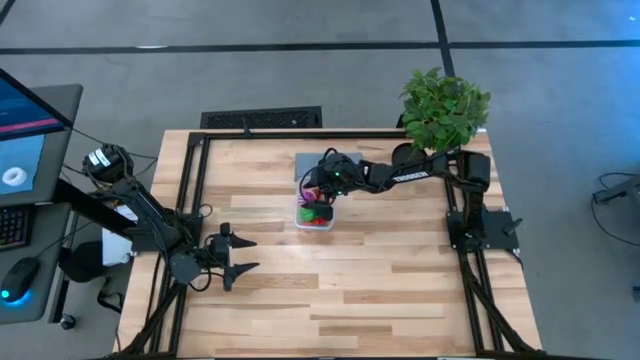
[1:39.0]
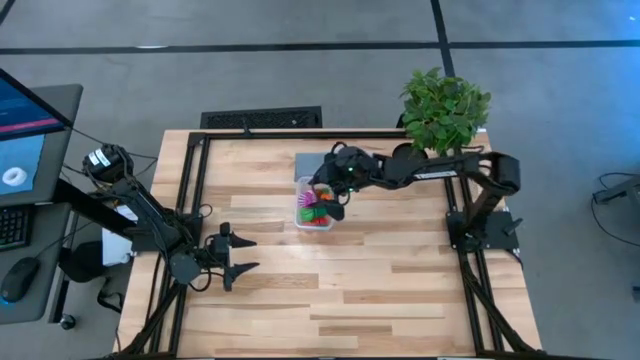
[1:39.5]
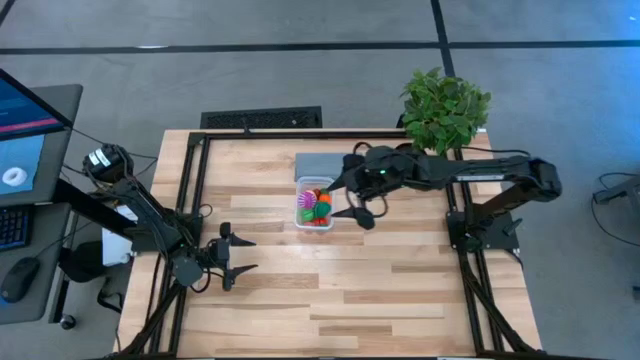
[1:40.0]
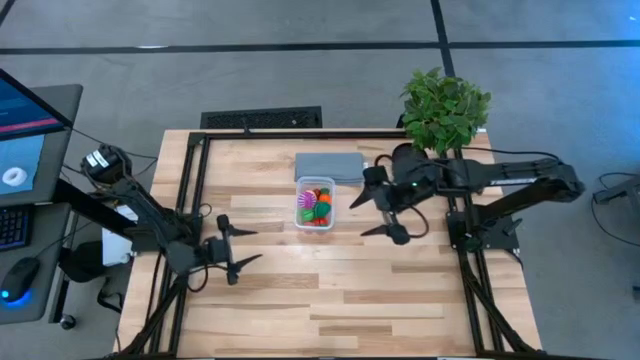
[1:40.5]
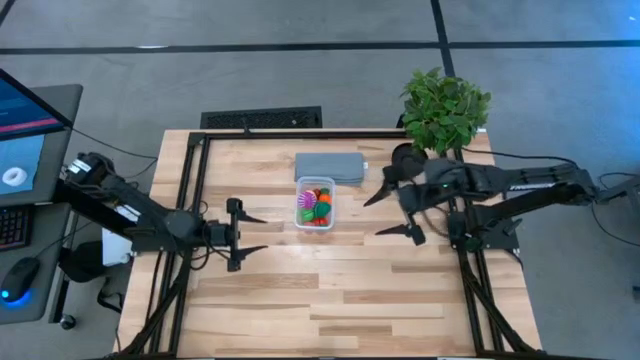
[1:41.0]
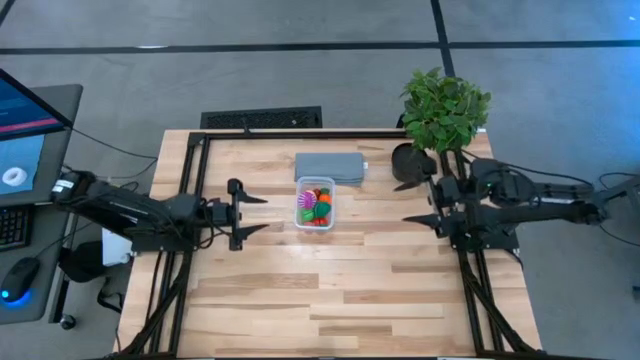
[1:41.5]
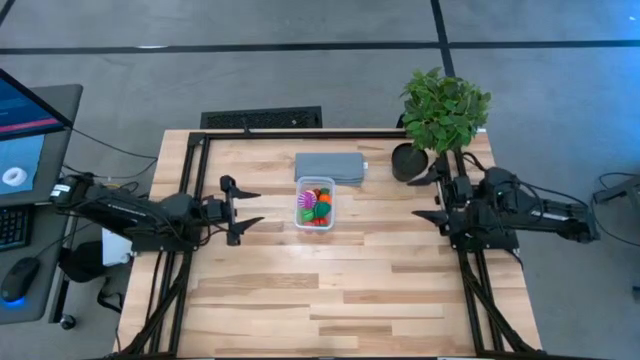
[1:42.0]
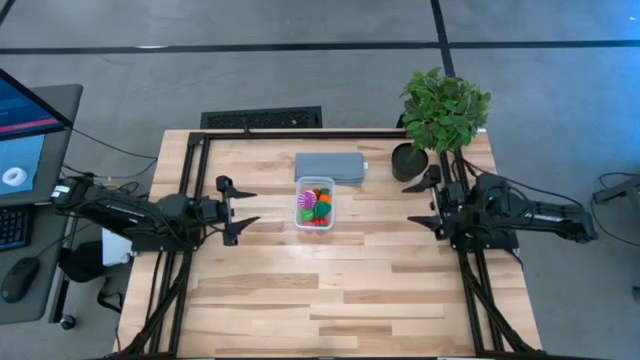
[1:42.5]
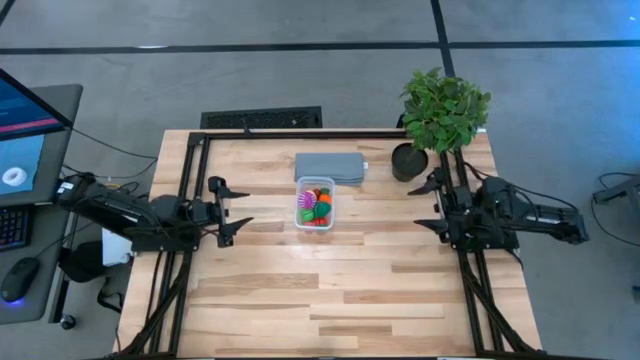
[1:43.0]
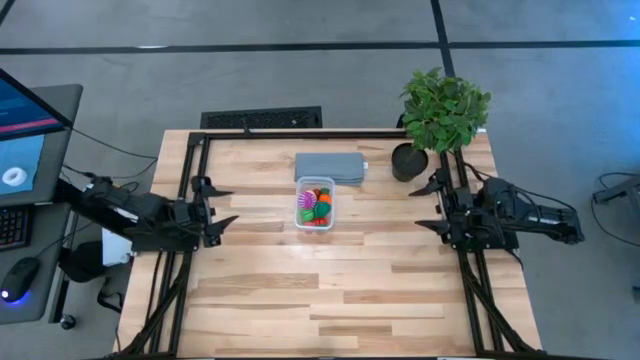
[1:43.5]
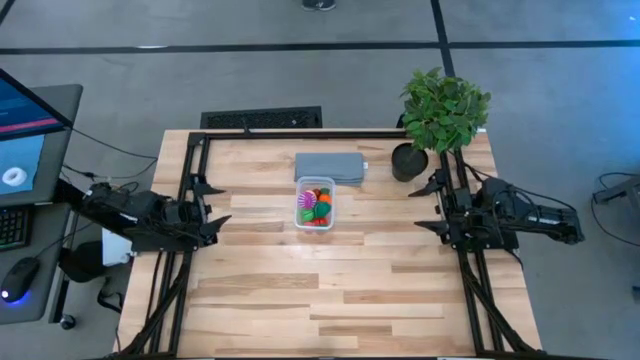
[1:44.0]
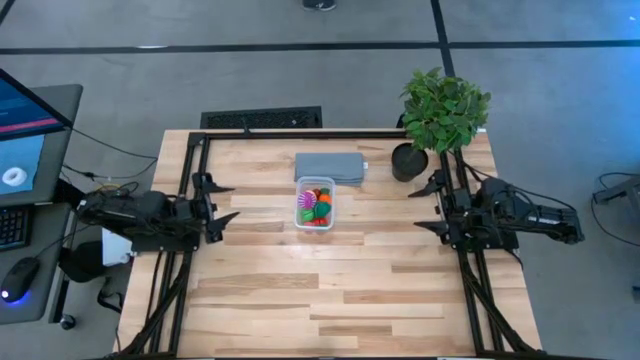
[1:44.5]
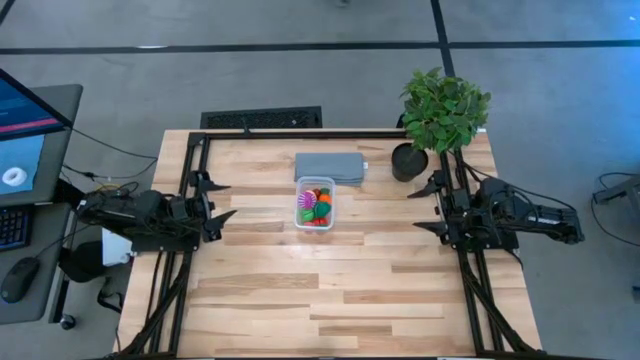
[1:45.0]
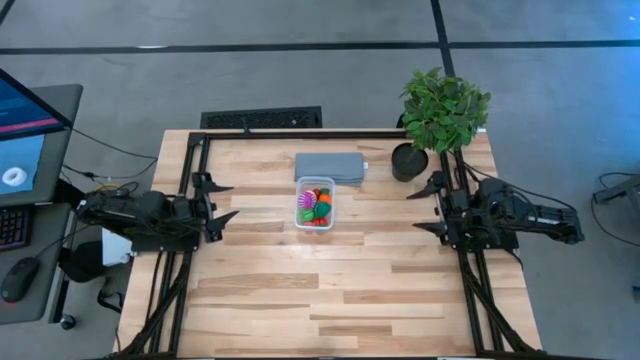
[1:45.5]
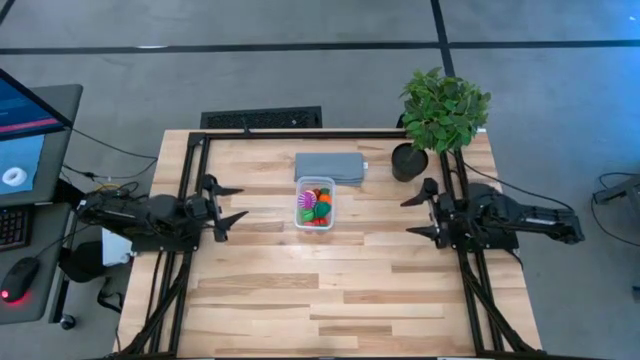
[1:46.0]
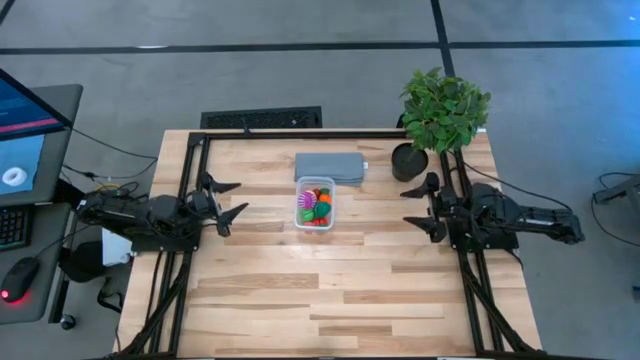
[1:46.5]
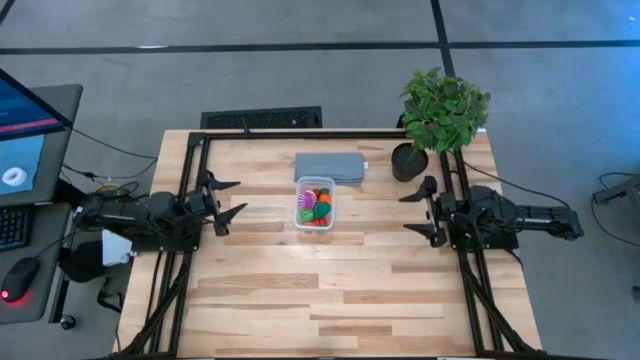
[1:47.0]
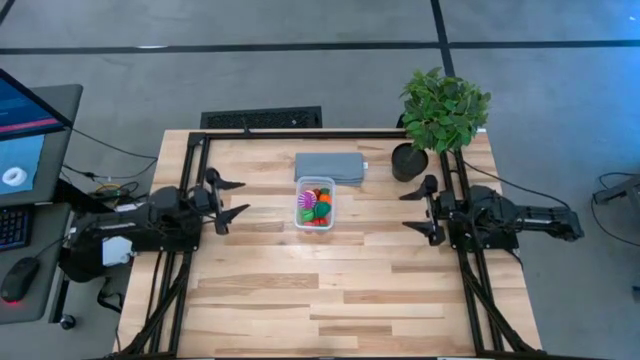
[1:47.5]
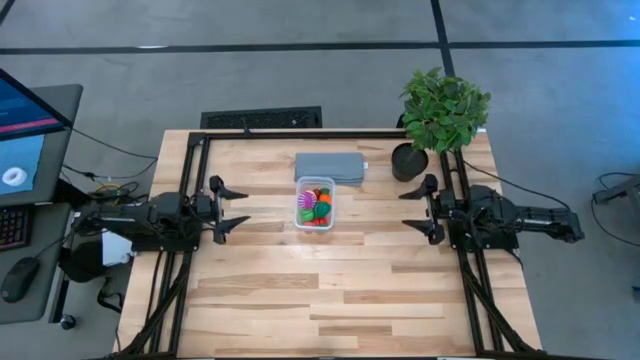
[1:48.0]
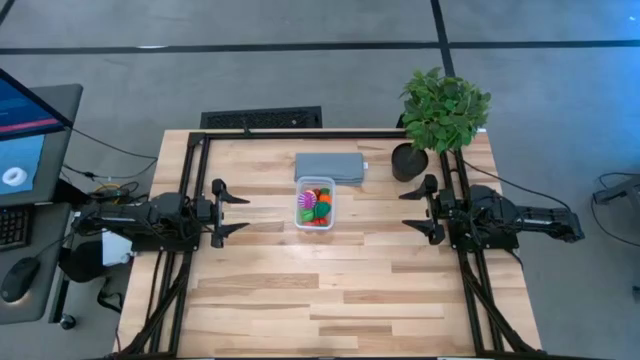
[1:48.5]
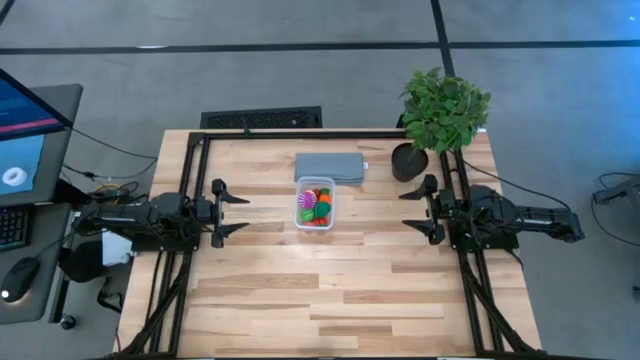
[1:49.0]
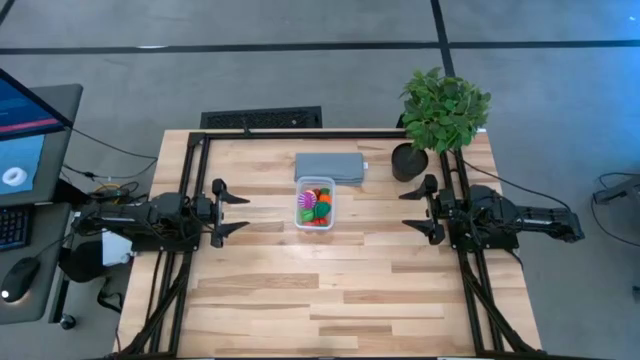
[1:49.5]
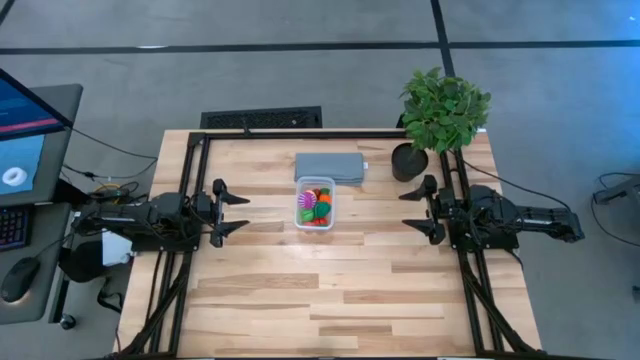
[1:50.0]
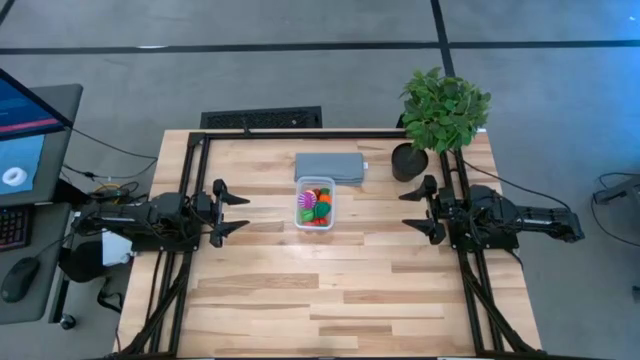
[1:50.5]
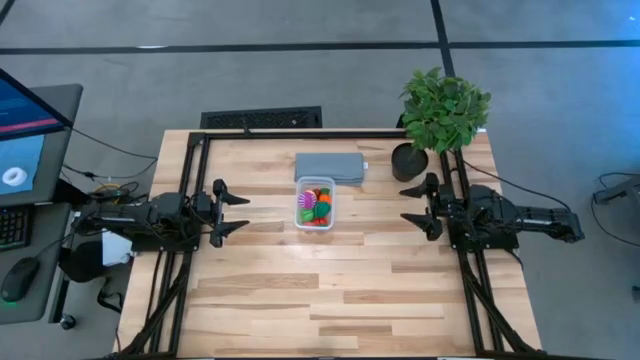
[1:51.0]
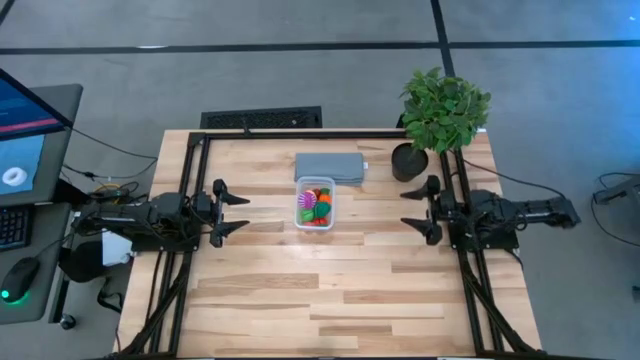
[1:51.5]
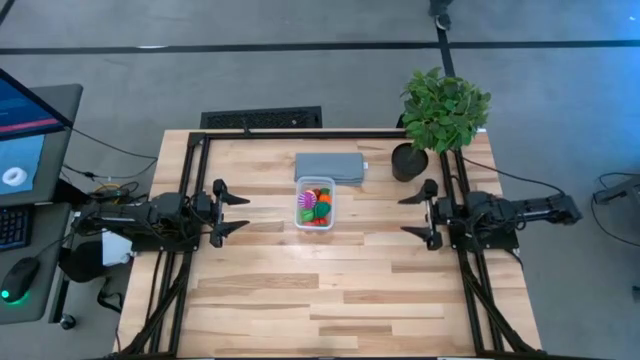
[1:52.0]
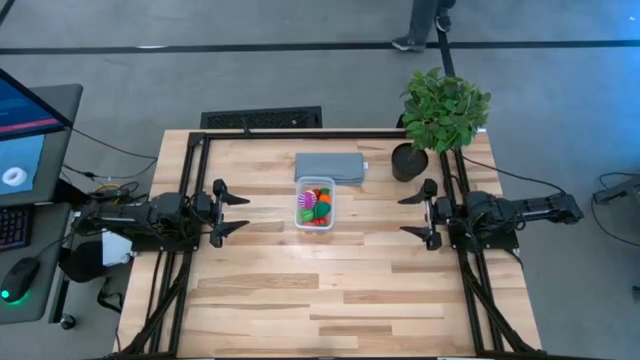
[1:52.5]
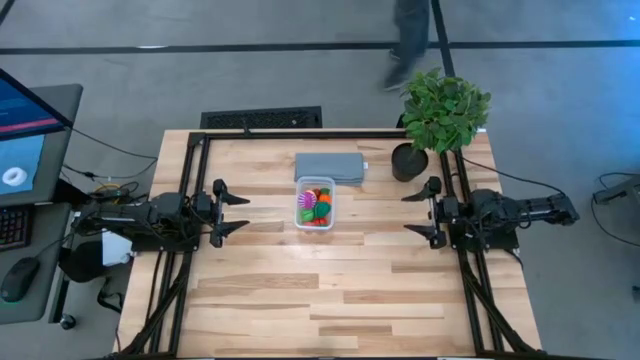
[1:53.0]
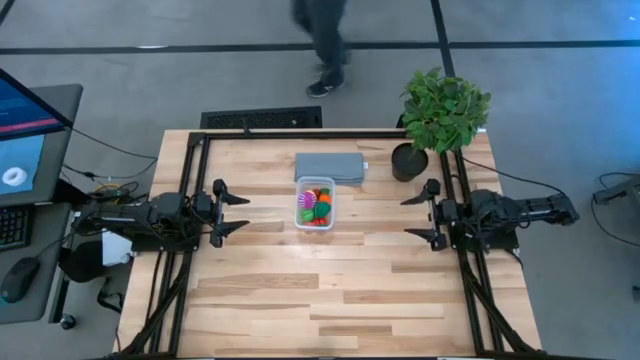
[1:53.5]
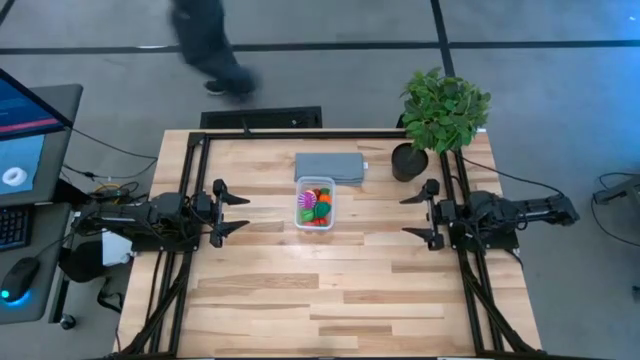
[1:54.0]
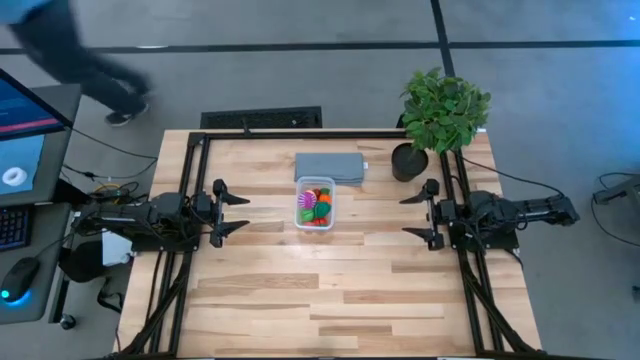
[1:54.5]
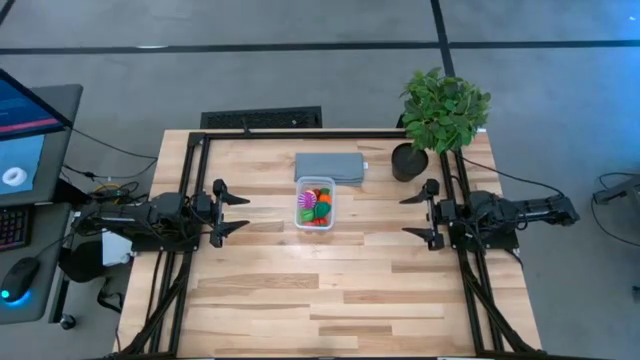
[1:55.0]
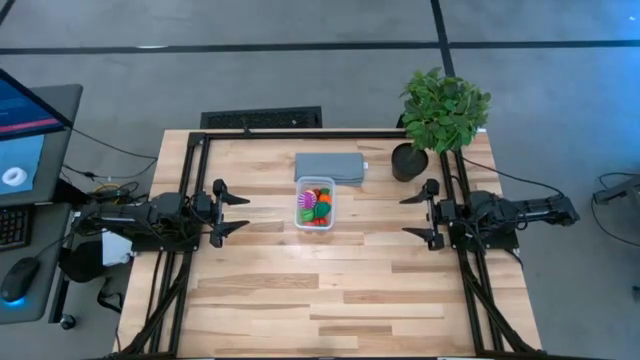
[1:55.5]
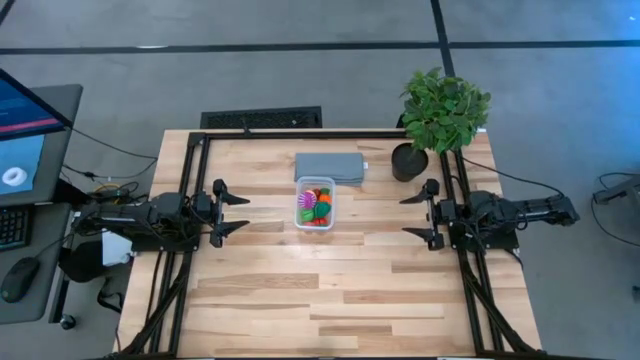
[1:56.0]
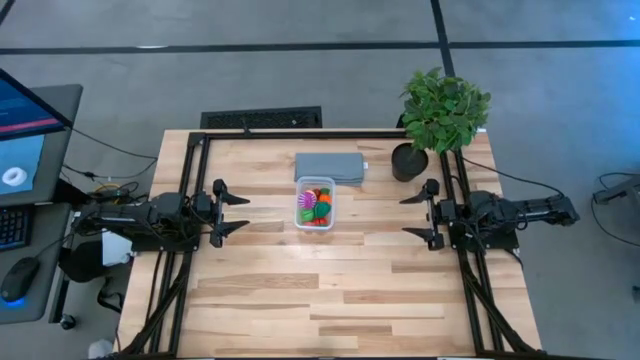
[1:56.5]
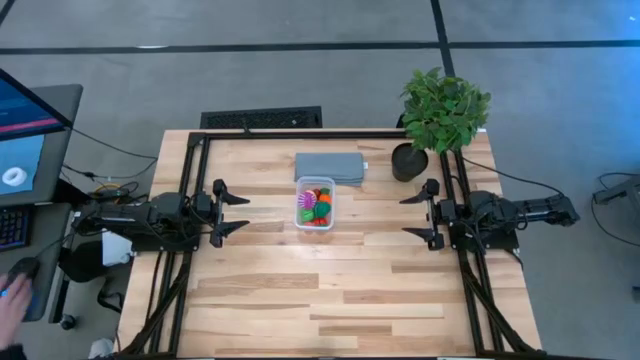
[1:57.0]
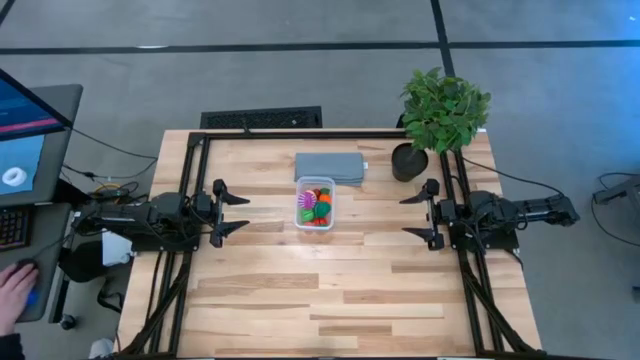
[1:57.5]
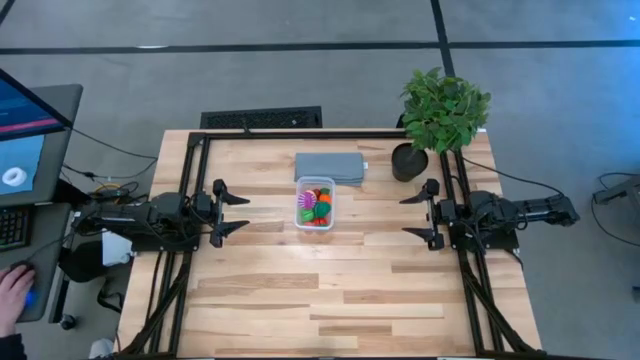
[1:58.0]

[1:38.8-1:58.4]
Task: Pick and placing Produce into tupperware
Return to Home Position

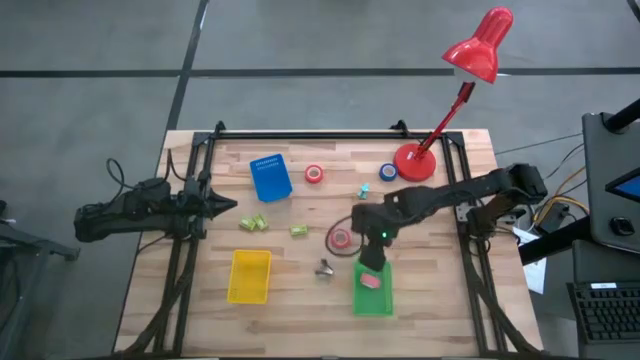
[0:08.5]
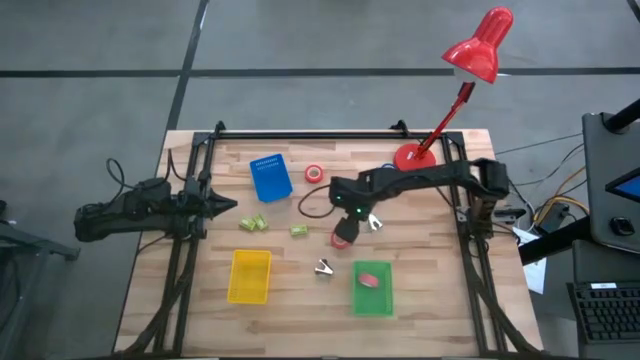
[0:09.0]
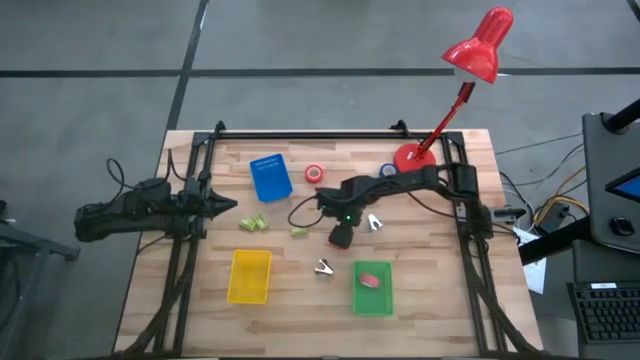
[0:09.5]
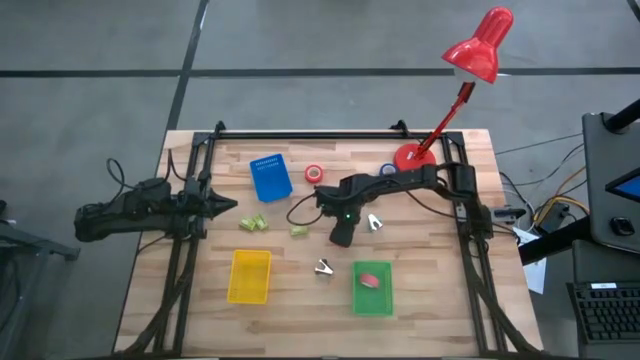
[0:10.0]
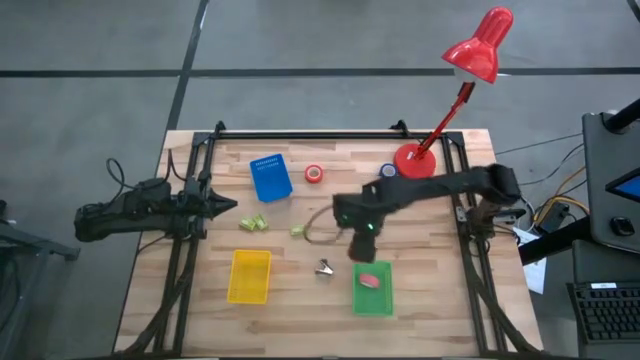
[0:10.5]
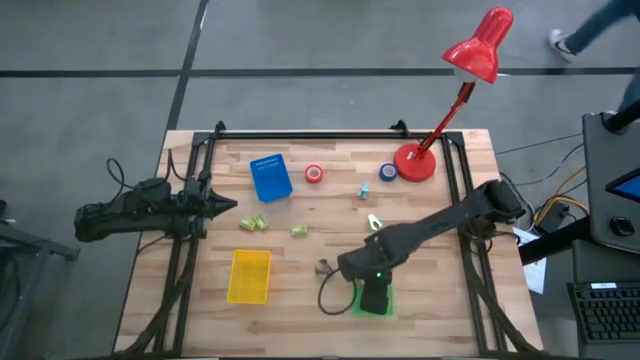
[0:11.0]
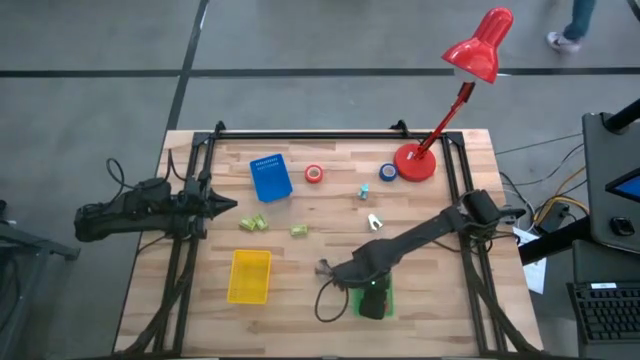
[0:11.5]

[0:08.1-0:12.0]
Task: Pick and place Stapler, Stapler remover, tape
Put the bottom orange electrical tape into the green bin
